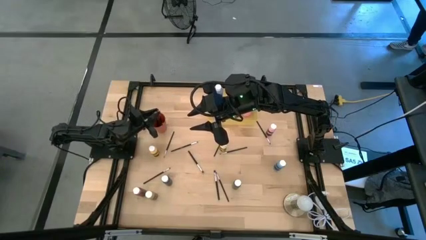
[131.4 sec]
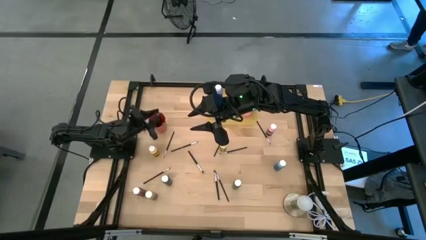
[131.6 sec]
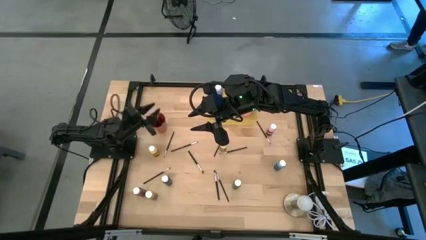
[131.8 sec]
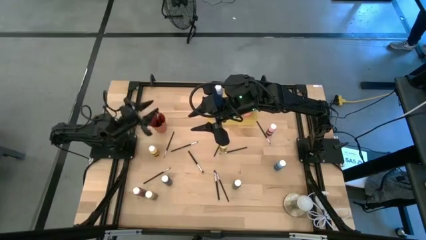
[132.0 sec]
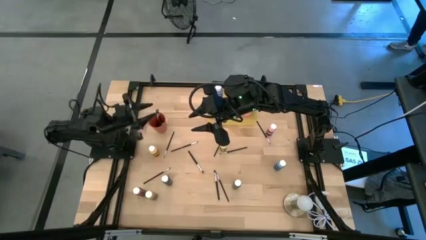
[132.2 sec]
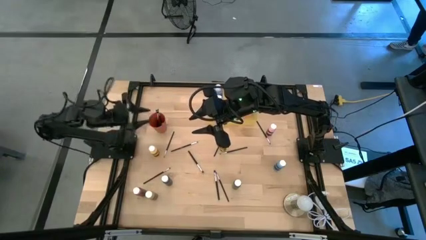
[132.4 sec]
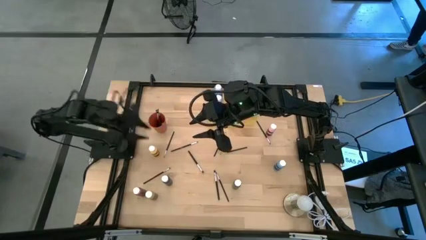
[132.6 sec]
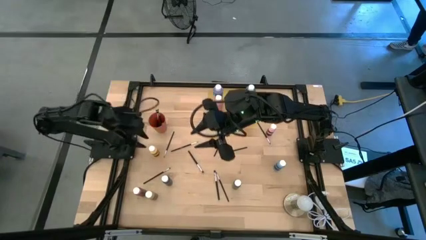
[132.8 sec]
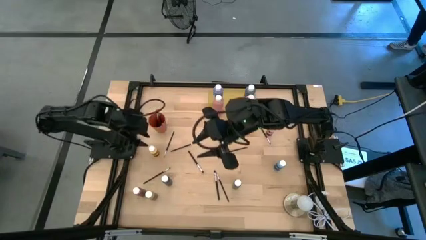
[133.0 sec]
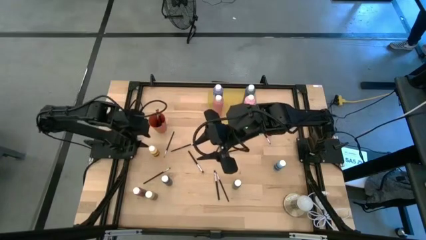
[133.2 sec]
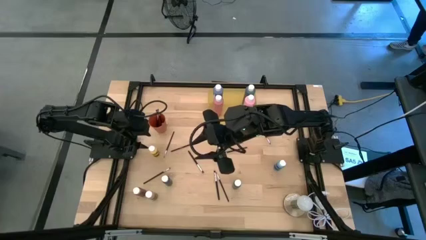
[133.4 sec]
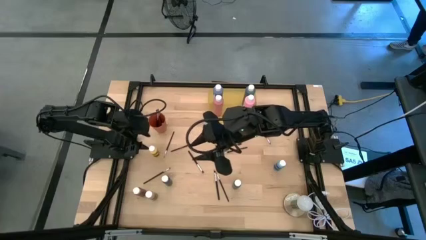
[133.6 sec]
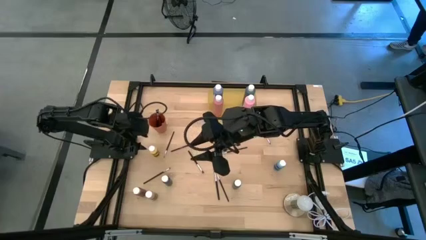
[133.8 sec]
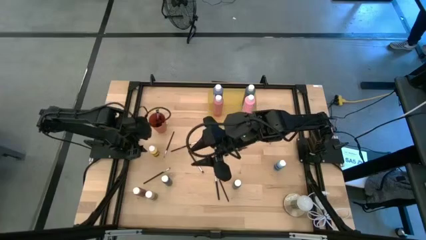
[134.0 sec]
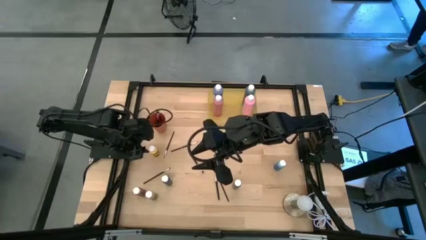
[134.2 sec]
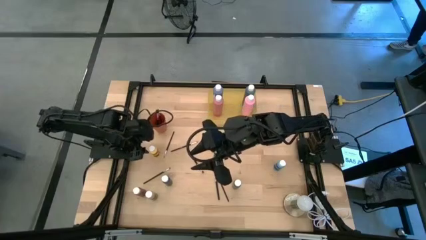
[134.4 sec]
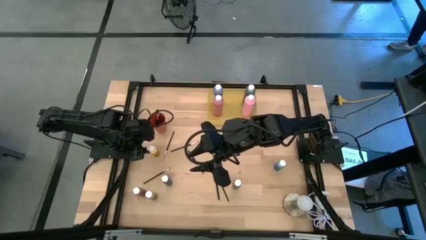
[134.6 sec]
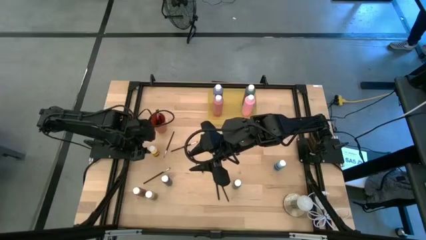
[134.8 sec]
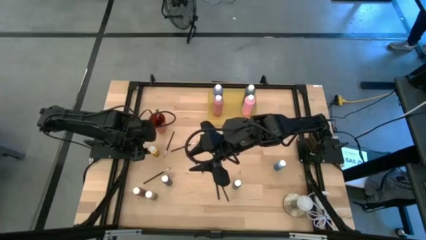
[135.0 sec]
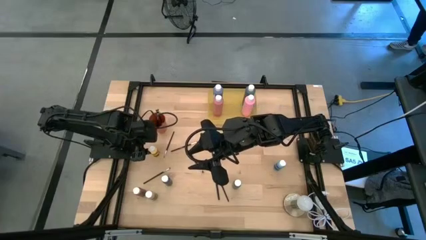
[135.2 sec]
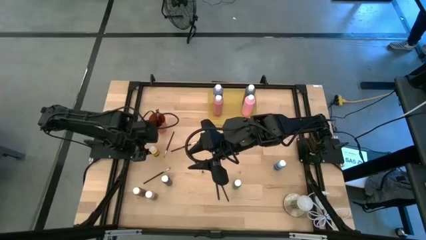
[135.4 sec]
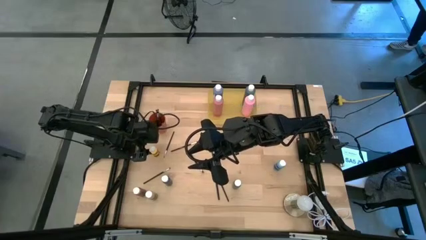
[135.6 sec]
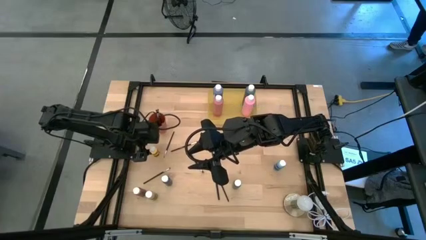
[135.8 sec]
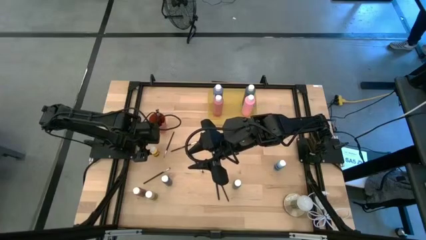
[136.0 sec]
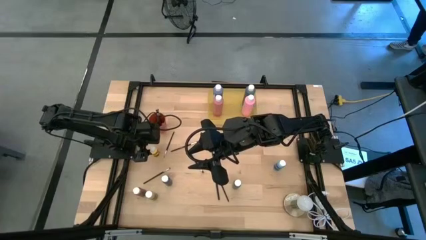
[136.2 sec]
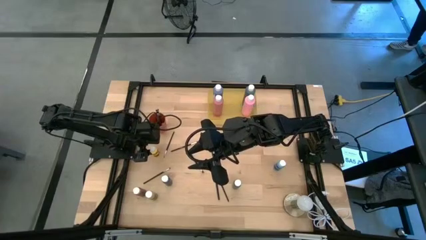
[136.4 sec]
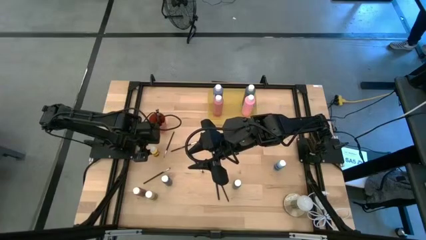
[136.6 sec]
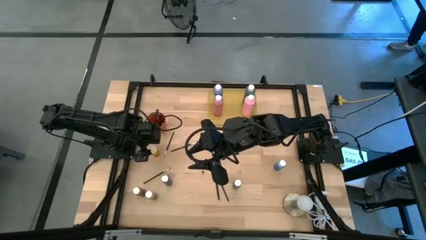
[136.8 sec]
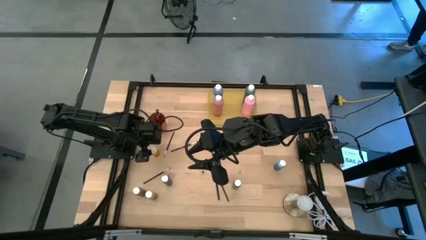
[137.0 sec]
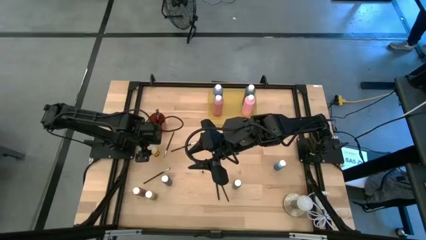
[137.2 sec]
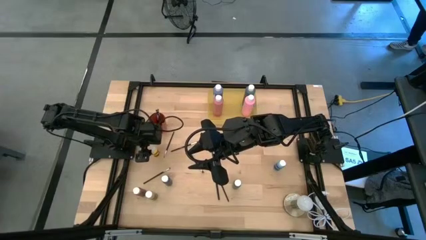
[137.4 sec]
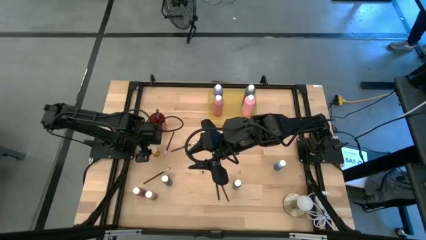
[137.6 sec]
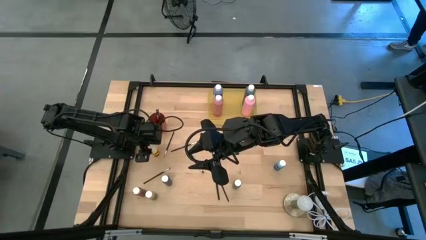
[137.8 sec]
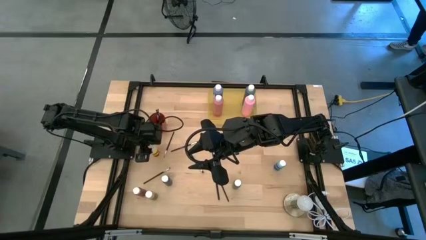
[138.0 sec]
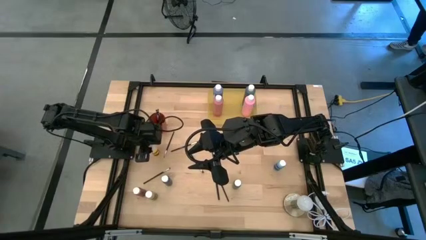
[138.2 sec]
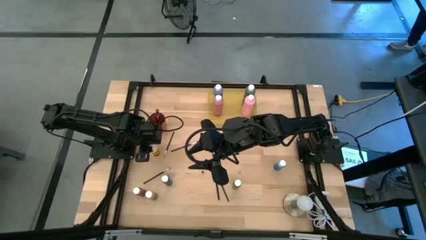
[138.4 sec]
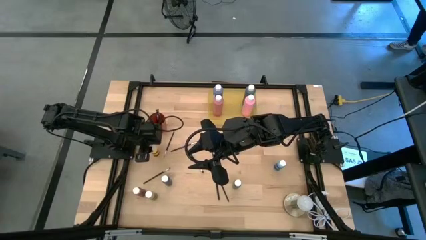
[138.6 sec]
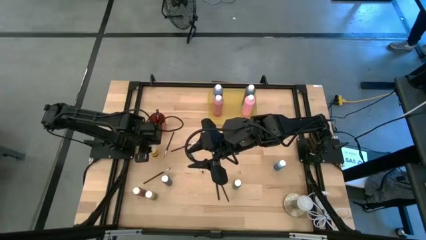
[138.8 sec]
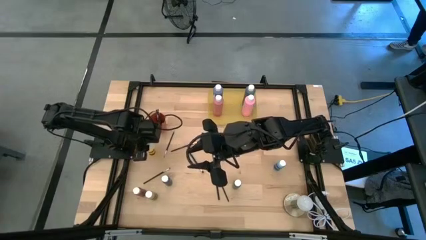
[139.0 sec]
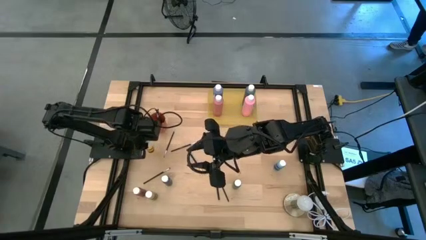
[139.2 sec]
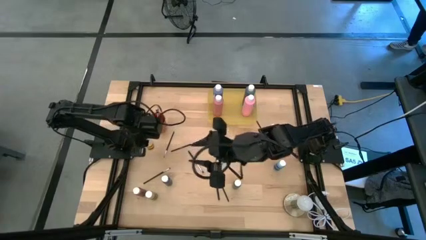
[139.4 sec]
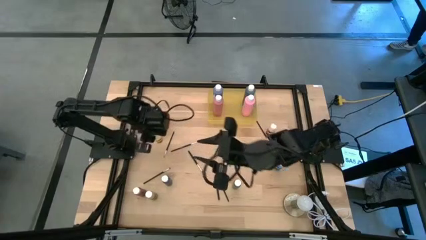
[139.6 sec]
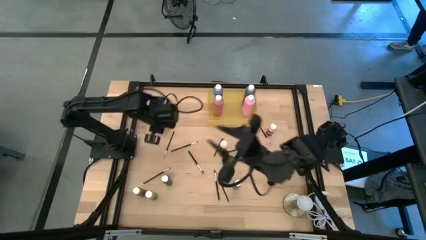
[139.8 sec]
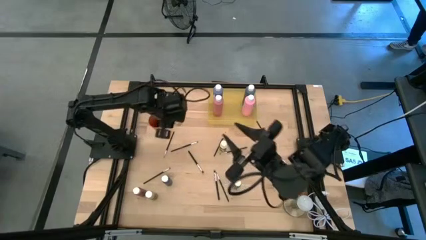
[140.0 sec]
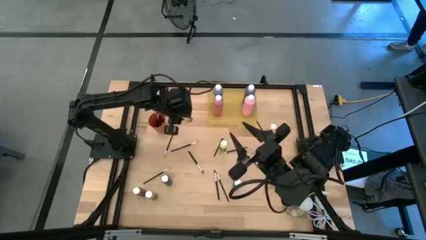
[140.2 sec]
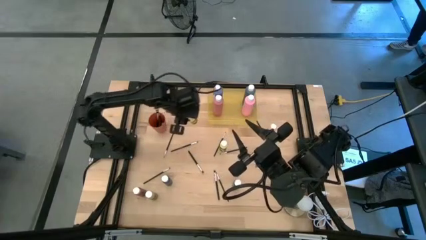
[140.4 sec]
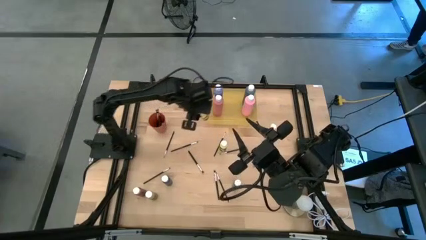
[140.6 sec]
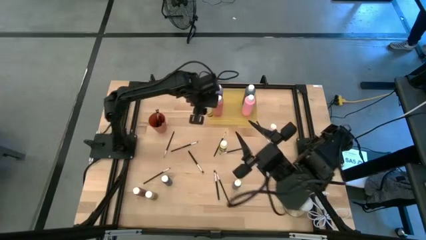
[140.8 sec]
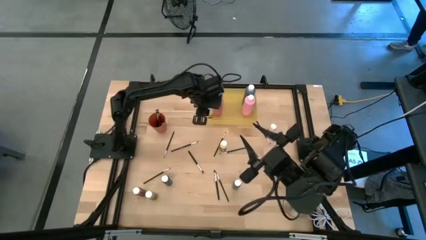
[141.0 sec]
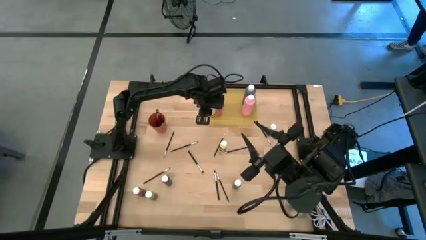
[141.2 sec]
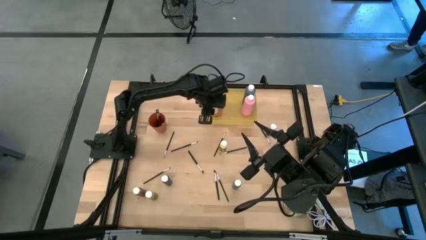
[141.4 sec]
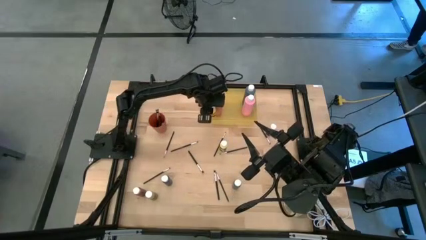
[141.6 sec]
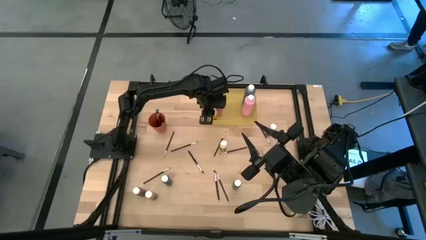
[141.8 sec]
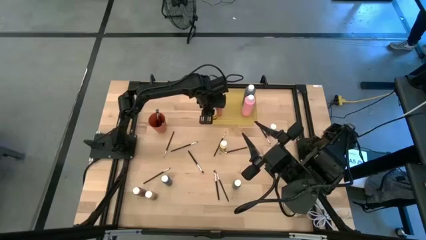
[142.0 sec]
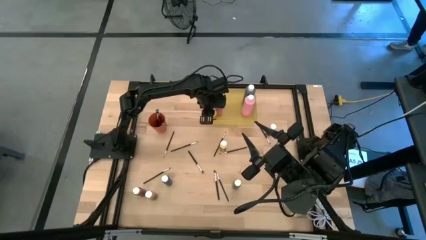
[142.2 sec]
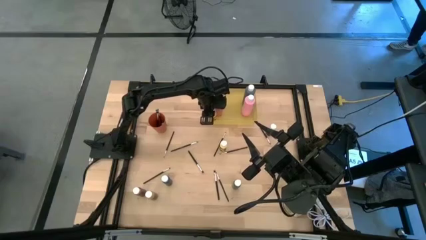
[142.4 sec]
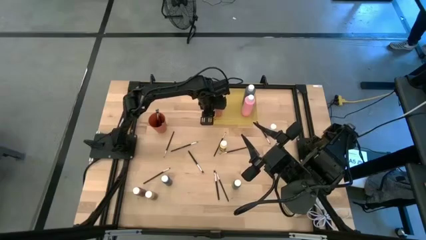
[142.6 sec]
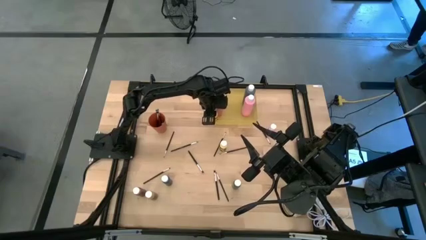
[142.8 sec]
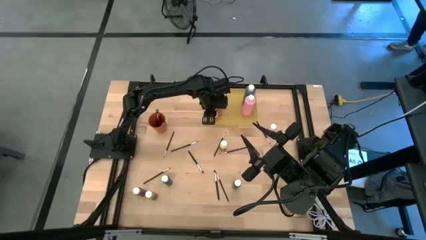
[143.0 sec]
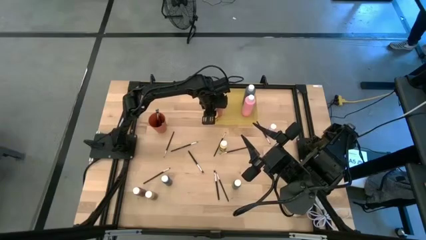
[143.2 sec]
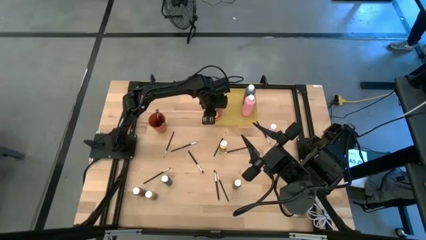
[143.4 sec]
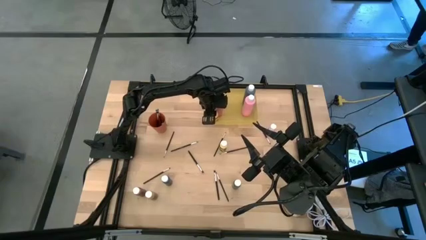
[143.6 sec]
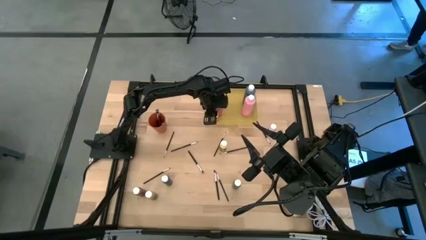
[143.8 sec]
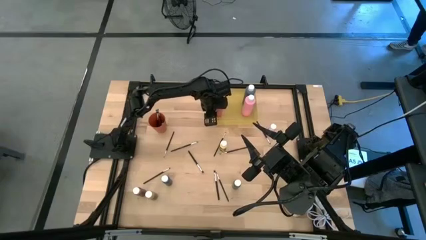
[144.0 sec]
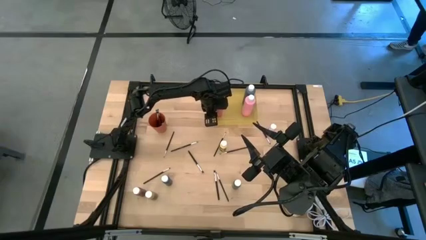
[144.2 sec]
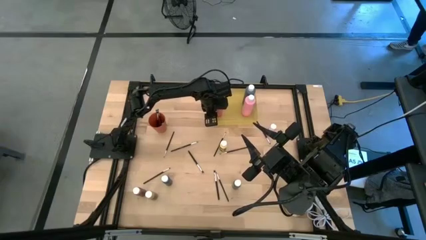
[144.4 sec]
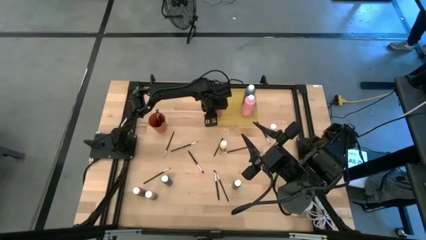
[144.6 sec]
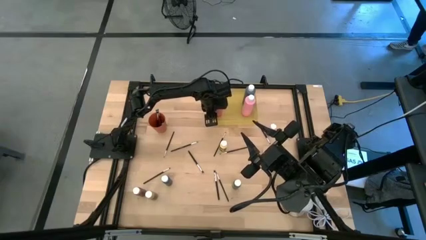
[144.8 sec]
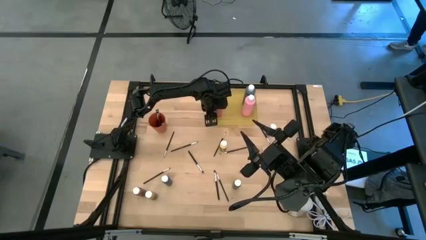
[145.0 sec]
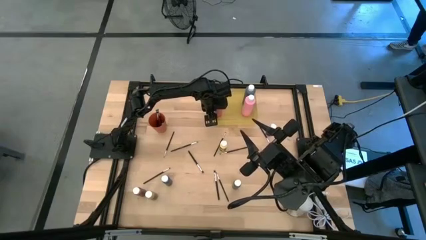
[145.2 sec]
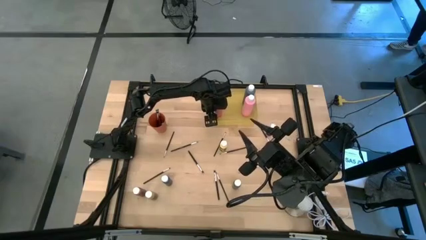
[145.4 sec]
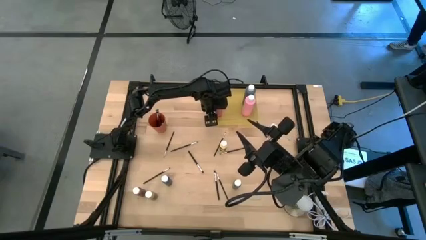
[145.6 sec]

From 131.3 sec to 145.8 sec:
Task: Pick & Place Paint Supplies
Put the top left small yellow paint bottle into the red bin

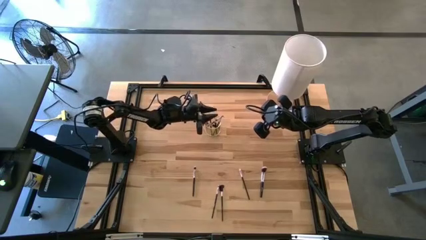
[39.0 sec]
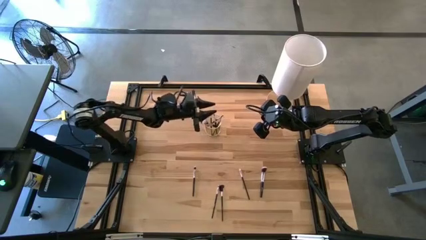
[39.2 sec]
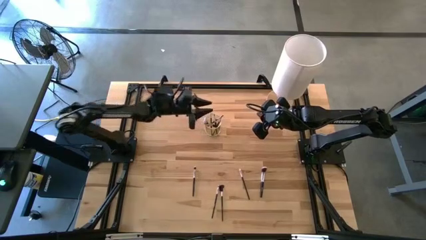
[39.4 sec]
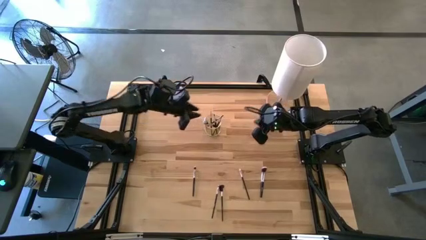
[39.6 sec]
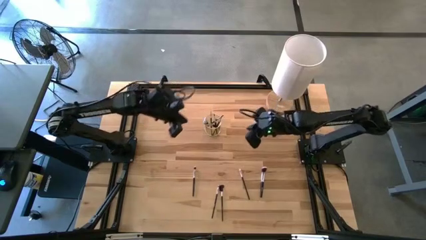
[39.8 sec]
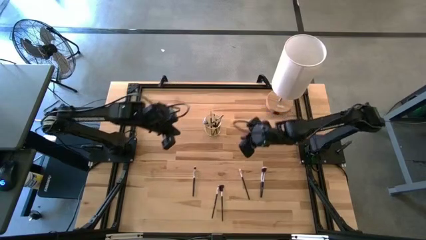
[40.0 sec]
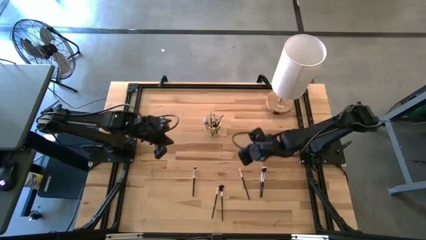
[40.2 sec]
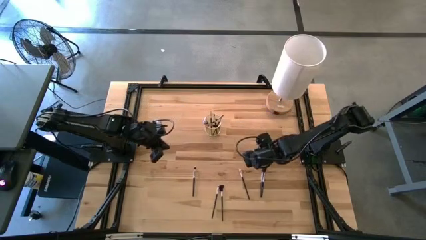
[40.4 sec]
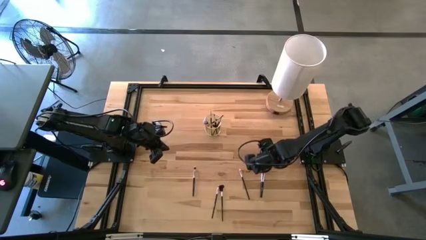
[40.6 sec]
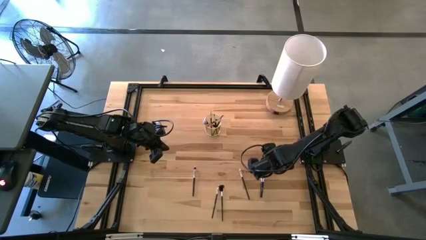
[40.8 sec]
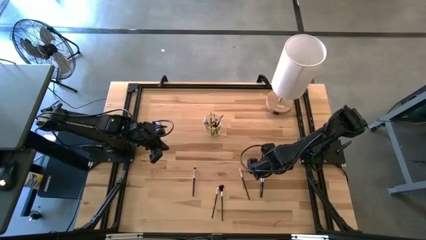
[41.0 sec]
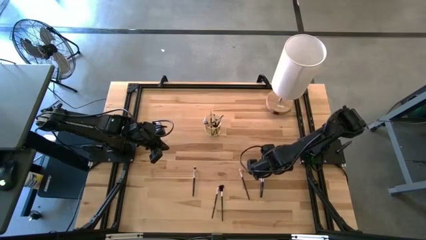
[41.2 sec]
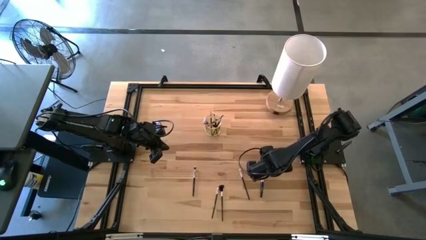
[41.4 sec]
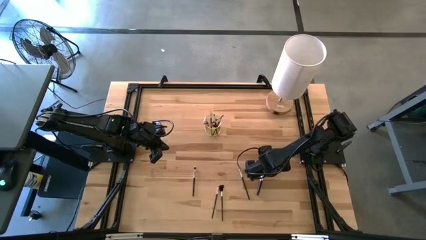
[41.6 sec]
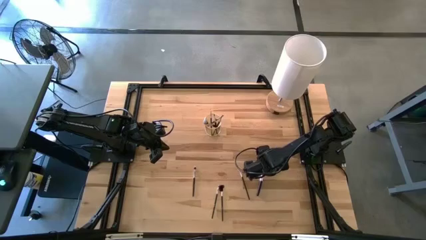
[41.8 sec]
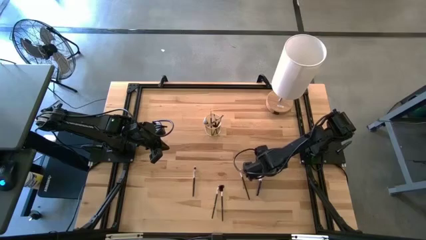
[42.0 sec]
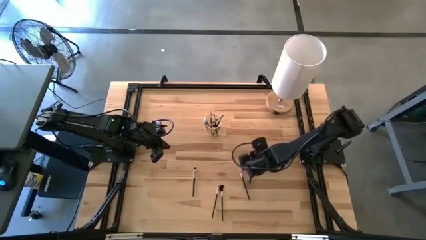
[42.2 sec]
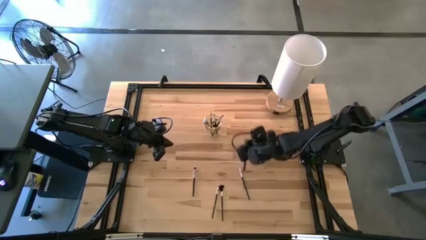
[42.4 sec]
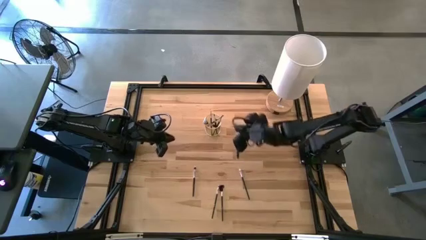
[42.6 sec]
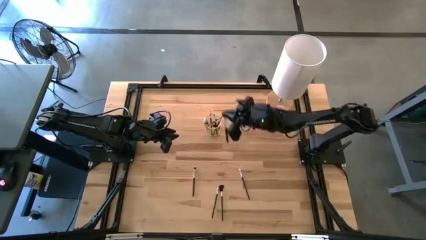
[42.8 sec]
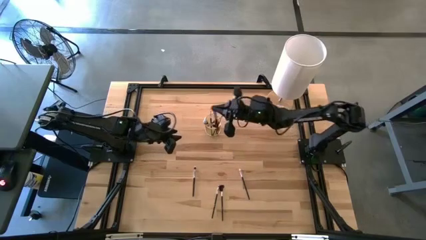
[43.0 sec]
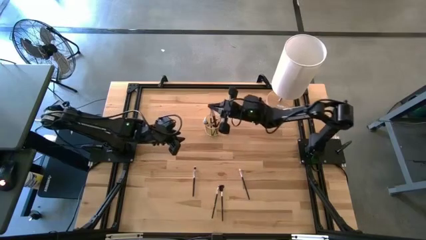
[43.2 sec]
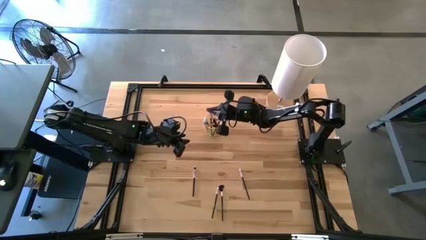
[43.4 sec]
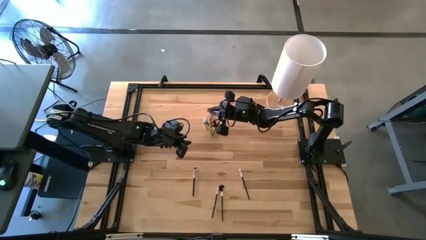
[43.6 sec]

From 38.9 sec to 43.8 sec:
Task: Put items in baskets/containers
Put the black powder brush into the gold container
